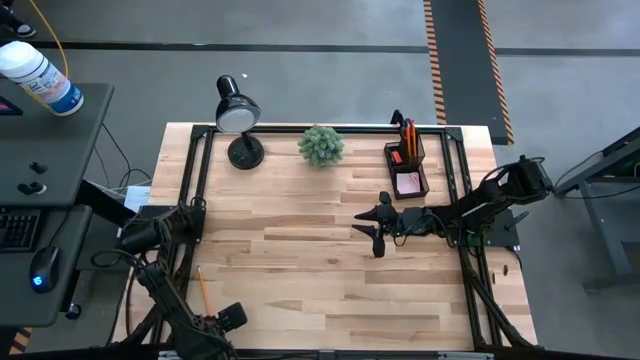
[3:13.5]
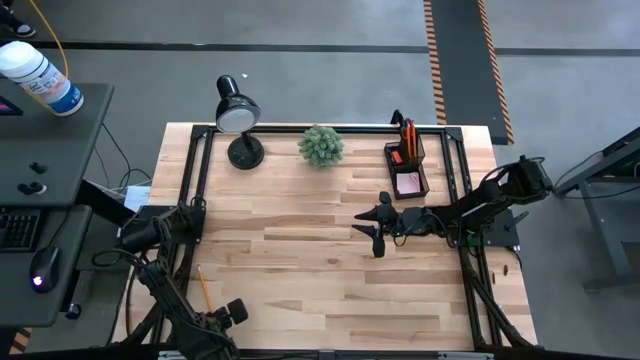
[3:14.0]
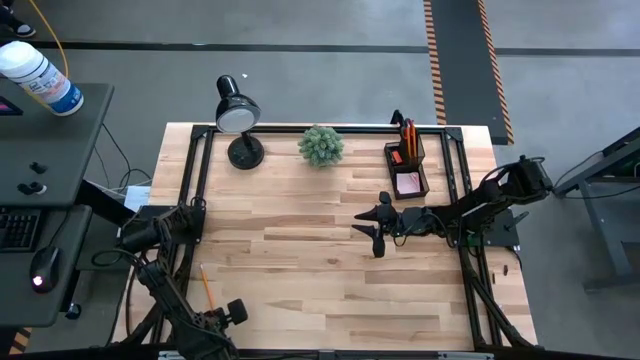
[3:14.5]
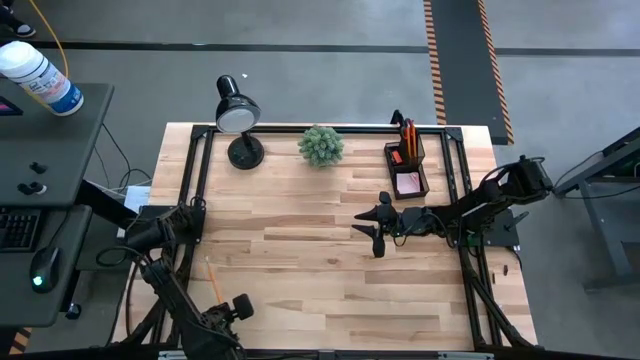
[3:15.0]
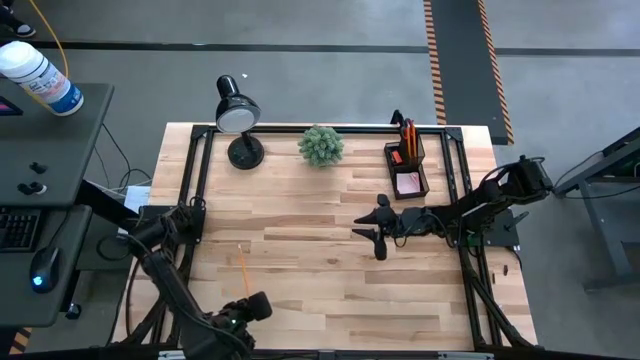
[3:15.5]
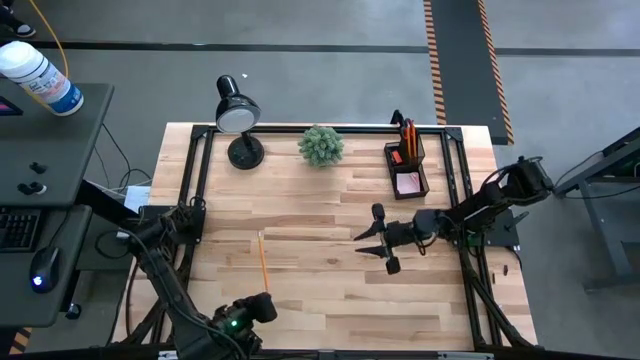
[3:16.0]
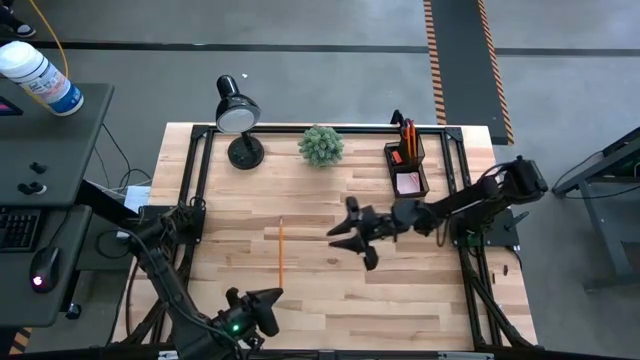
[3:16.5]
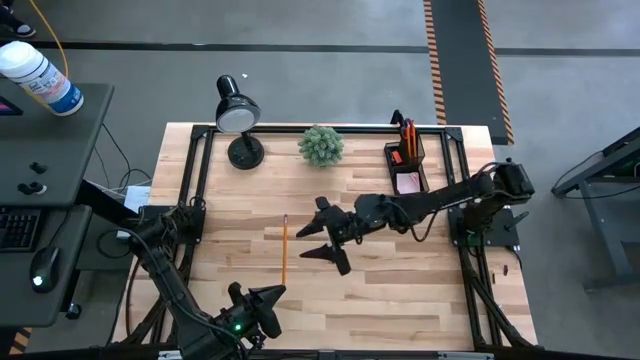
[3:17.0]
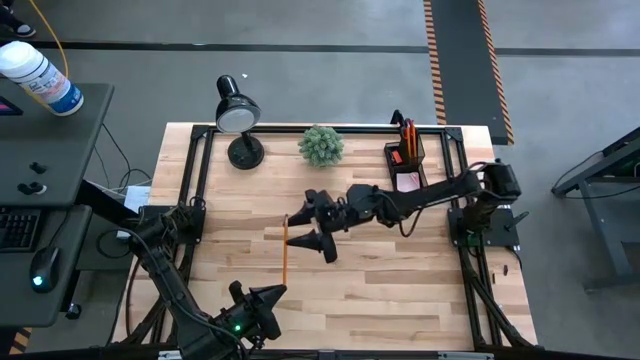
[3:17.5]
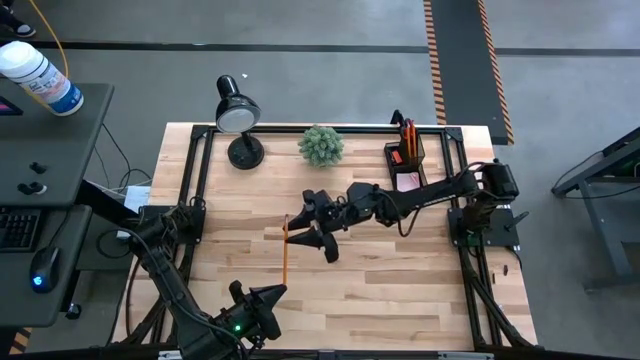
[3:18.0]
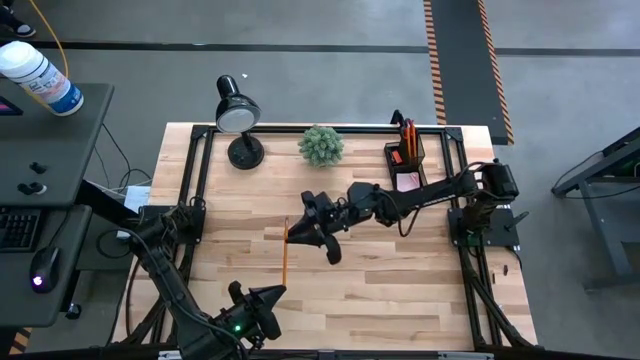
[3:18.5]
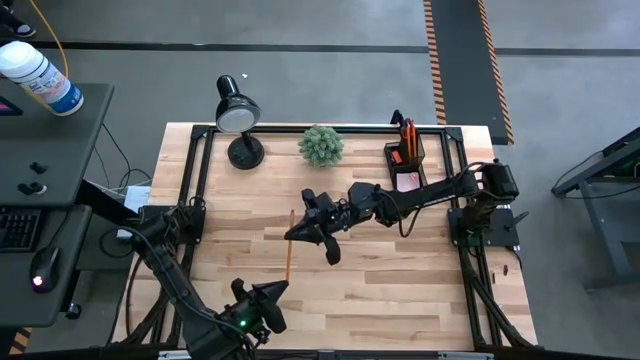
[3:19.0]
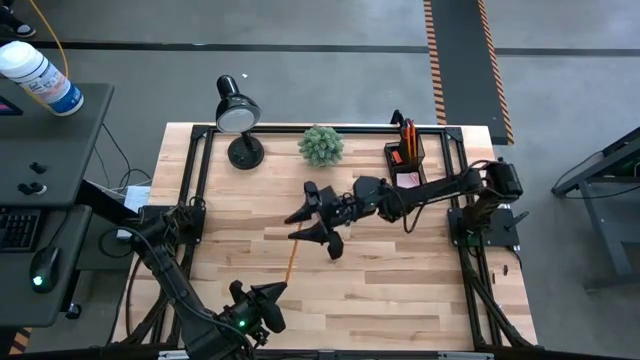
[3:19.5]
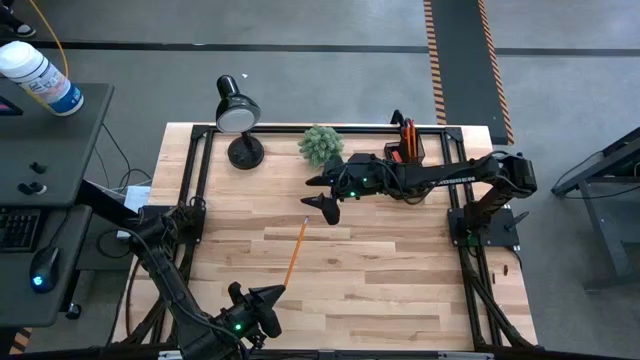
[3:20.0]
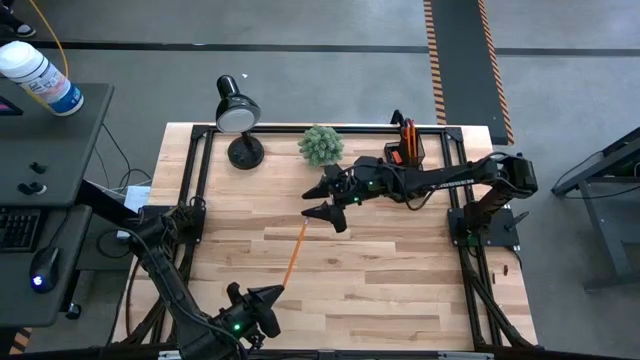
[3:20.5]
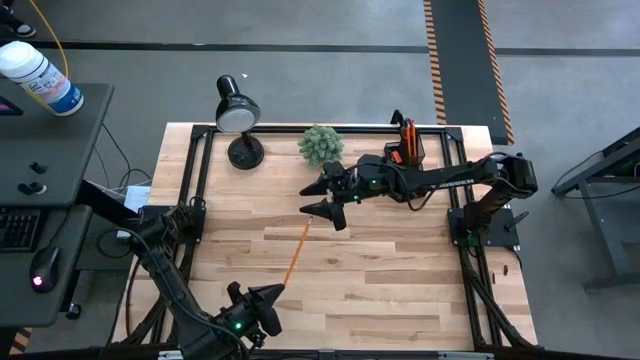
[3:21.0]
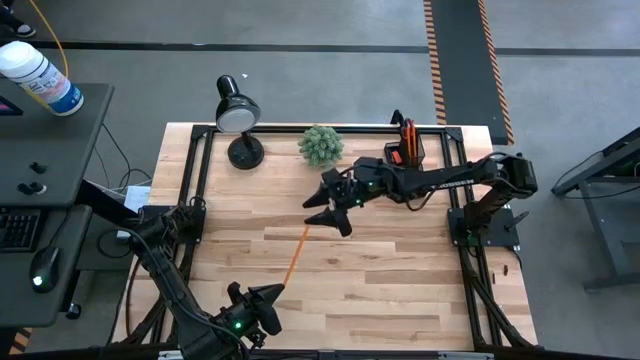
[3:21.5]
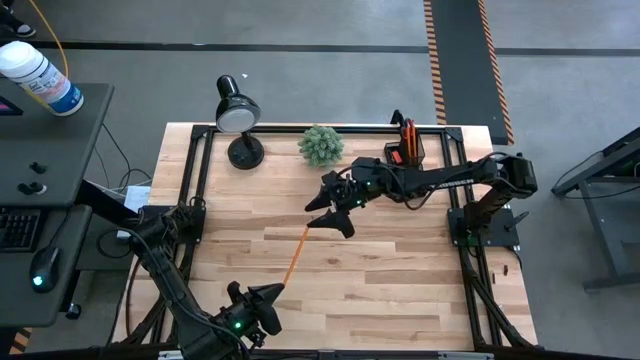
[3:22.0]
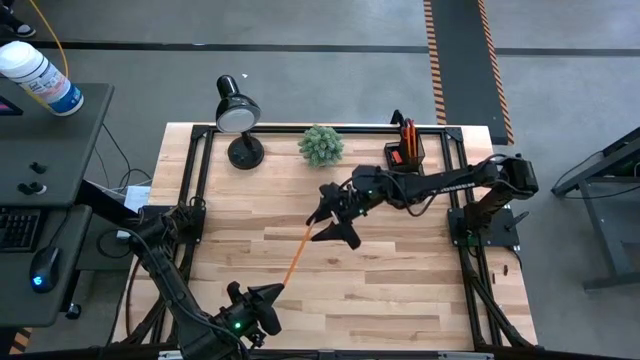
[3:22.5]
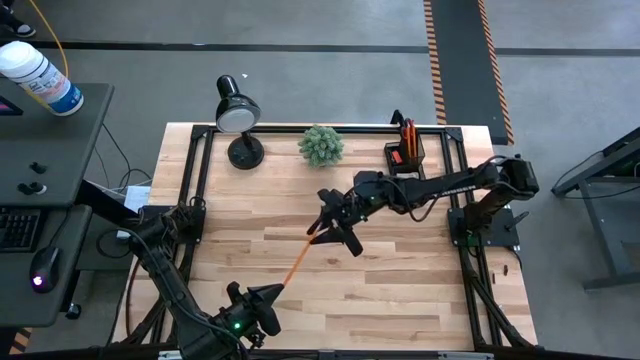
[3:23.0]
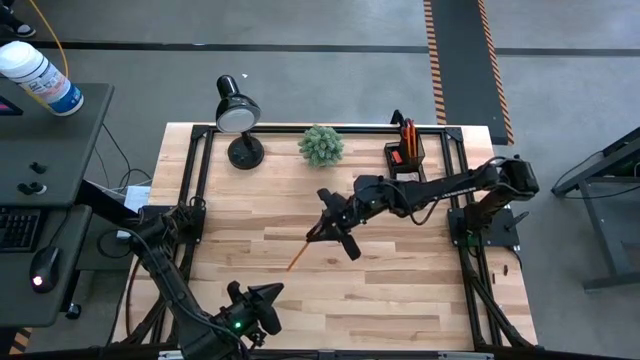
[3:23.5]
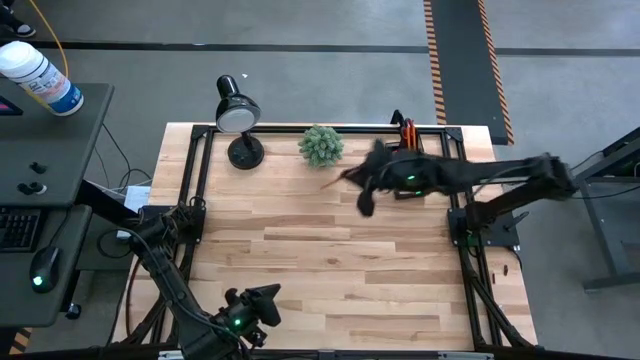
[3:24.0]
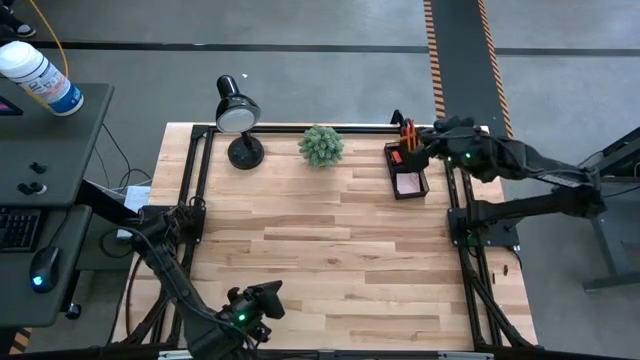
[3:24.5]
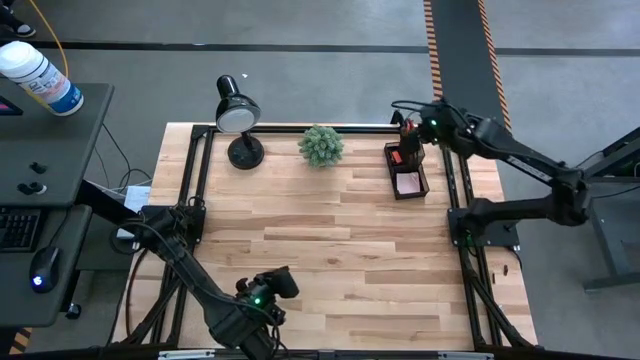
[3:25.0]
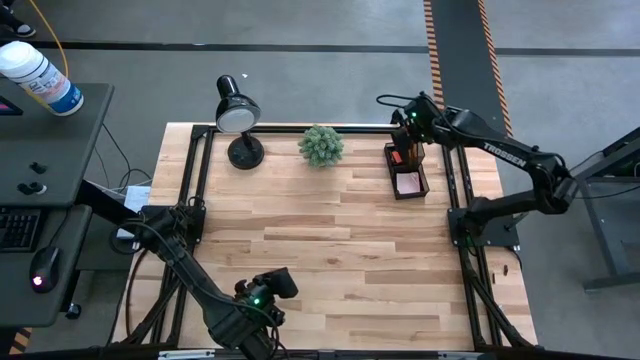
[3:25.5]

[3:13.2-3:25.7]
Task: Pick and place office supplies into organizer
Put the pencil into the desk organizer

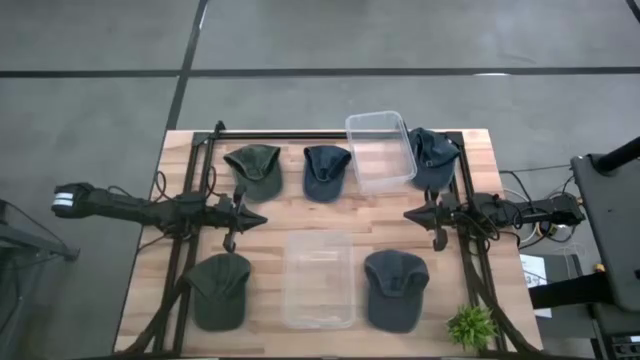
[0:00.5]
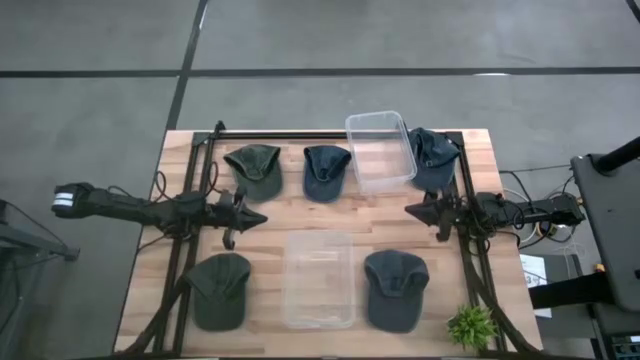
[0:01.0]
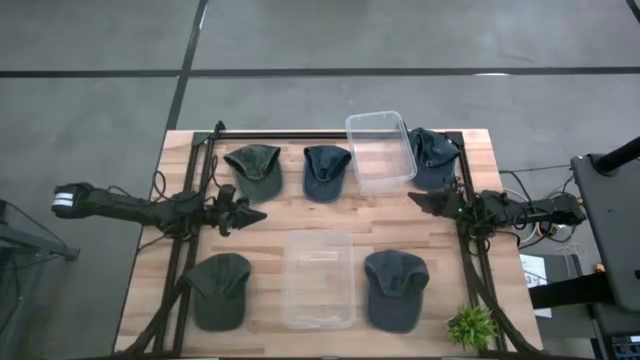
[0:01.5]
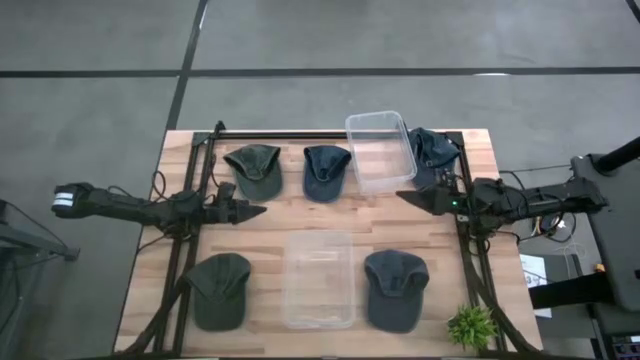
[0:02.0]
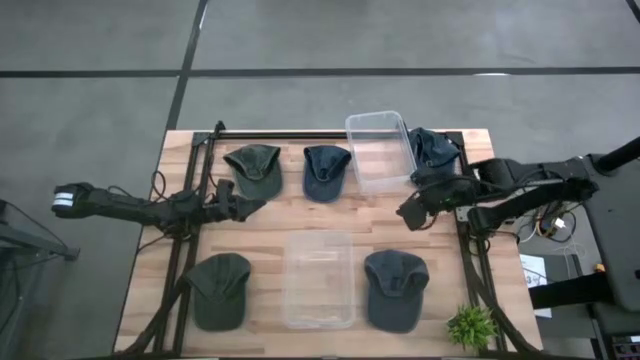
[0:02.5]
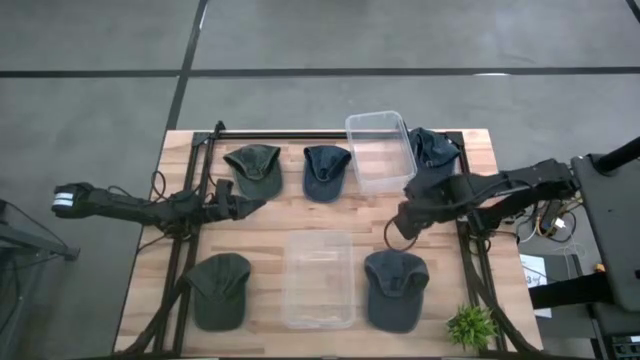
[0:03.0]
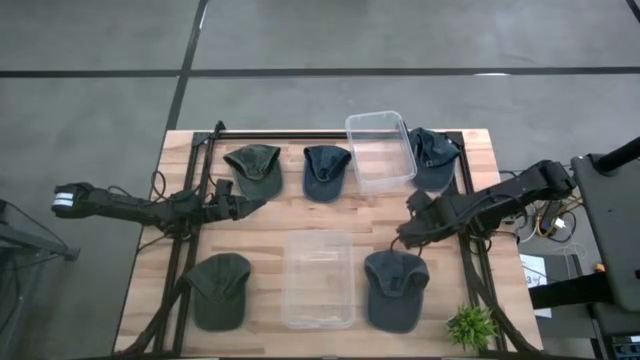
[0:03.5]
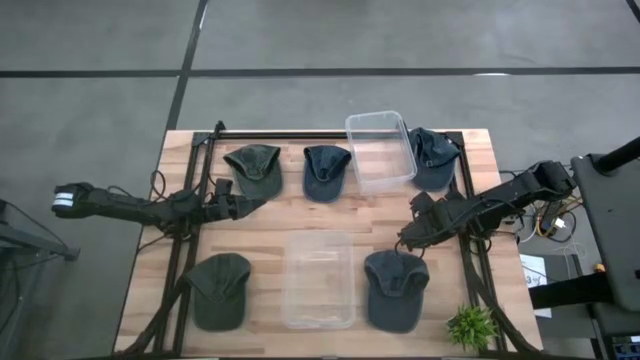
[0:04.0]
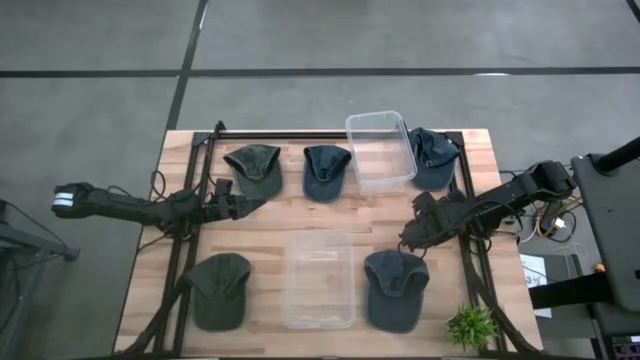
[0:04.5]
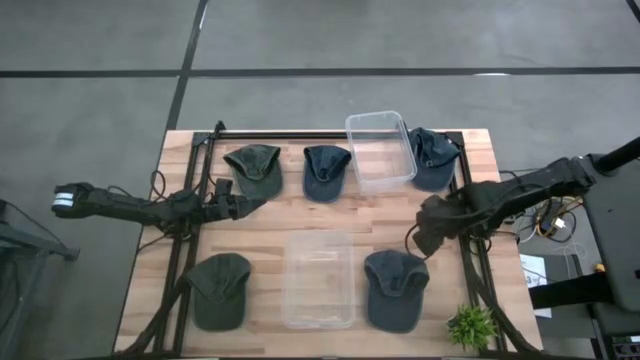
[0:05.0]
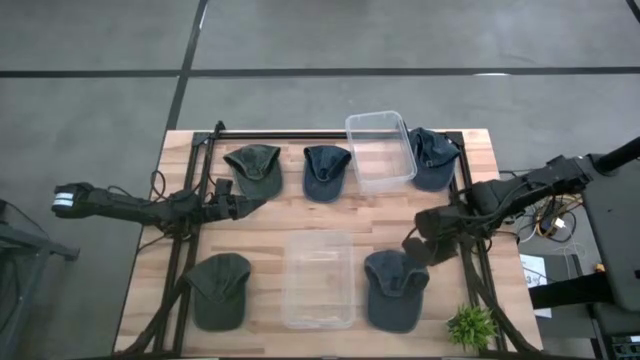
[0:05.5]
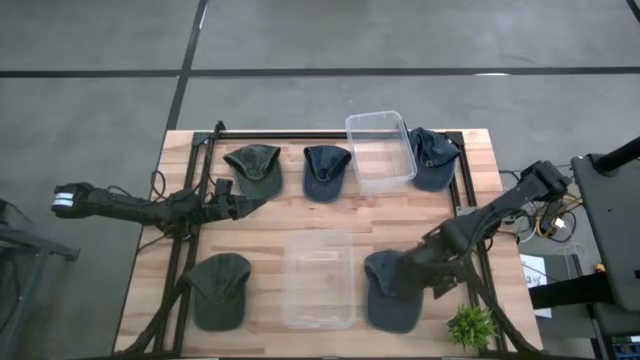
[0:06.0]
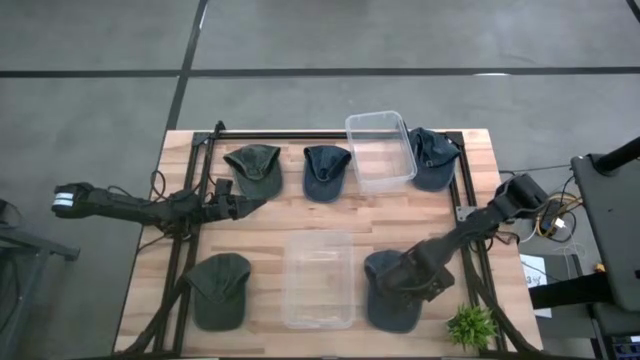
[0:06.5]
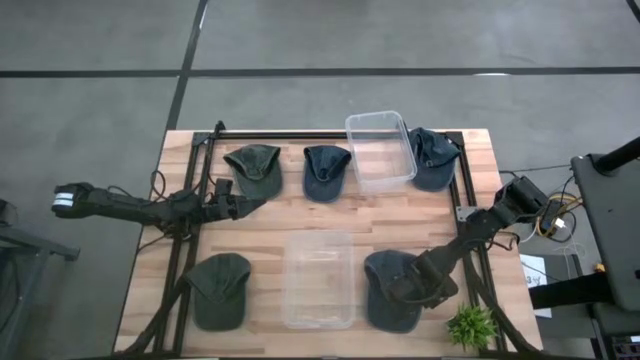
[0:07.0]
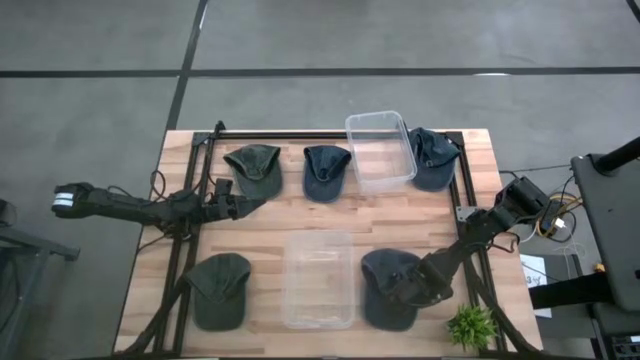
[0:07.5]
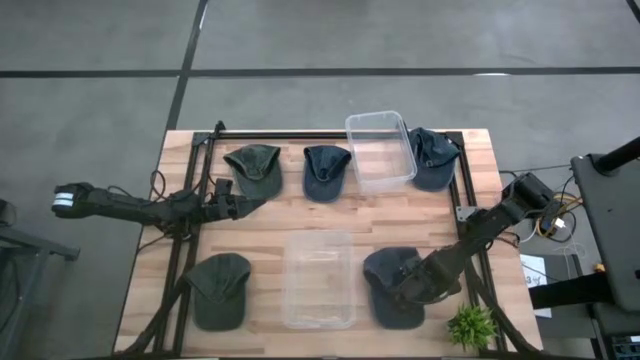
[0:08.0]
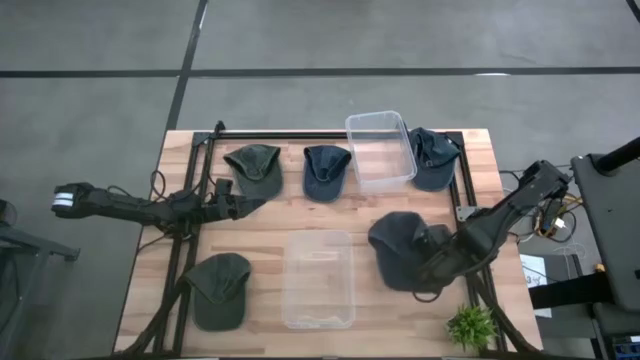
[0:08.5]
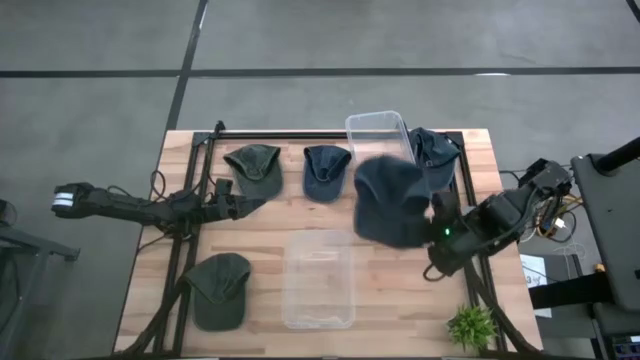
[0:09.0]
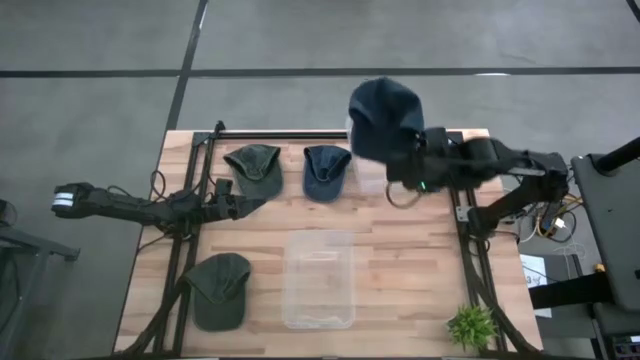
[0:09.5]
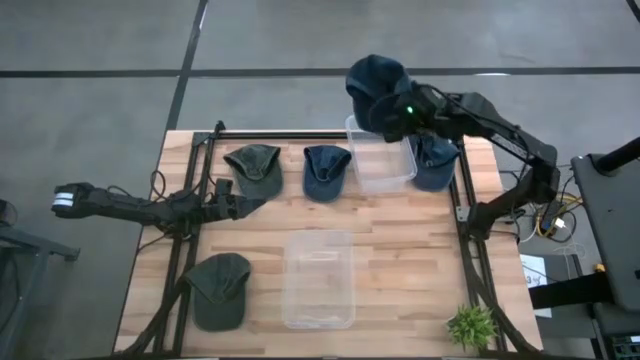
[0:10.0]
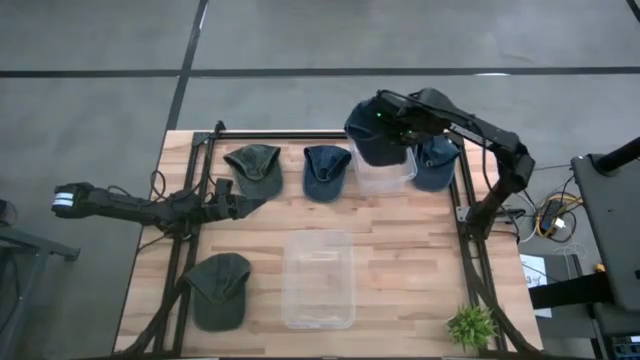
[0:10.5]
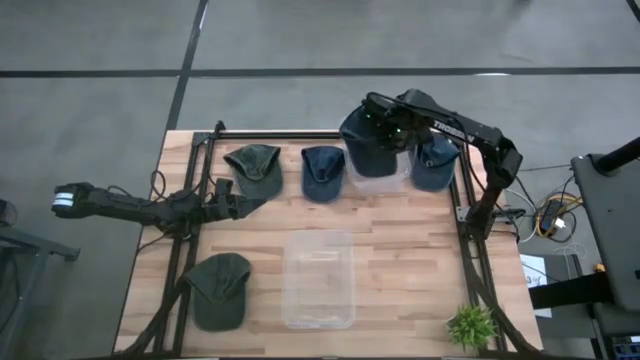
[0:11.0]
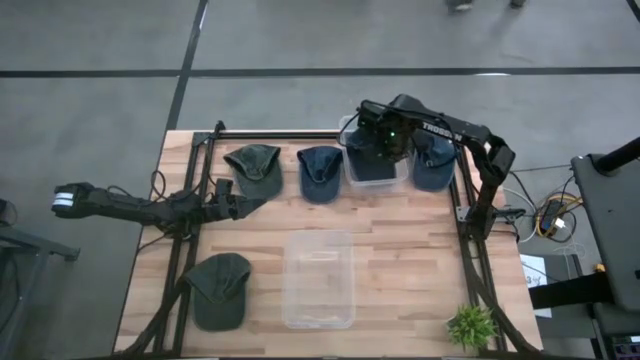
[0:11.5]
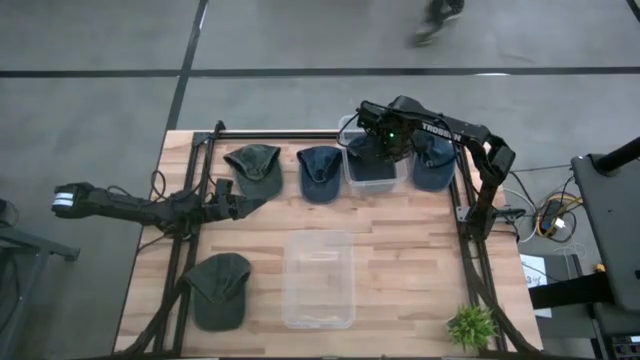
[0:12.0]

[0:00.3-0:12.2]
Task: Pick & Place hat
Put the bottom blue cap into the top transparent bin
